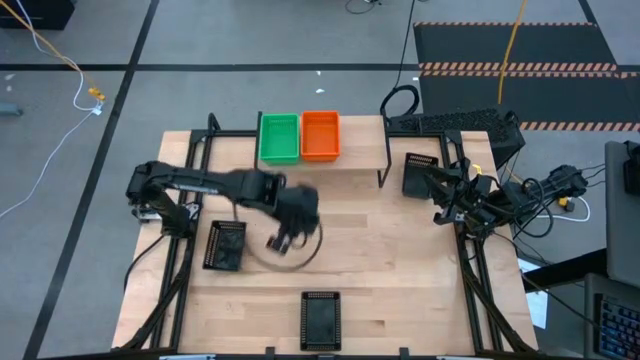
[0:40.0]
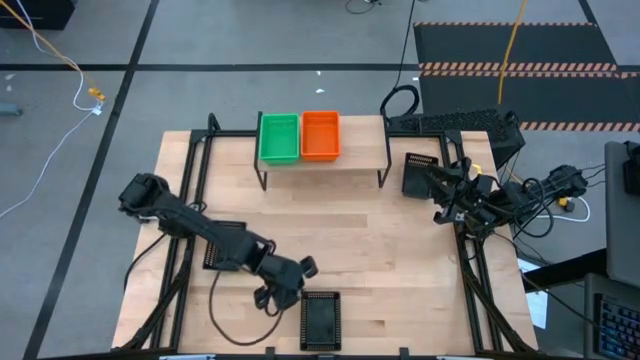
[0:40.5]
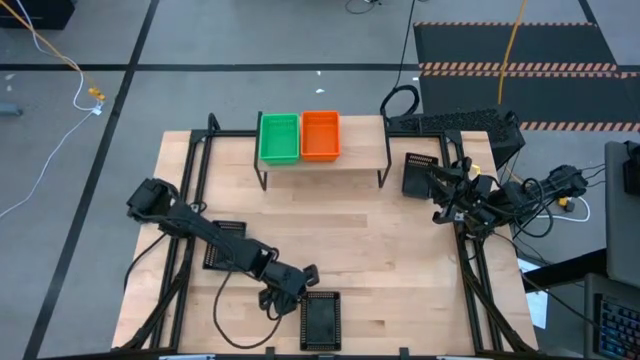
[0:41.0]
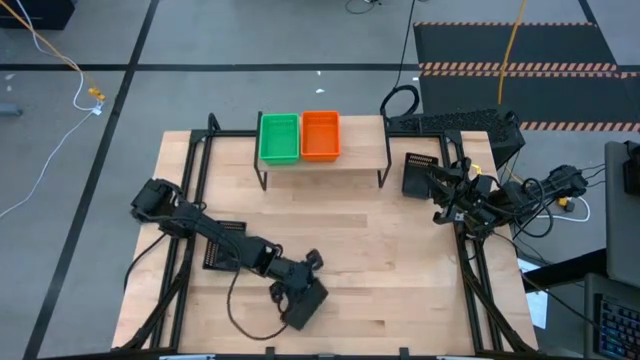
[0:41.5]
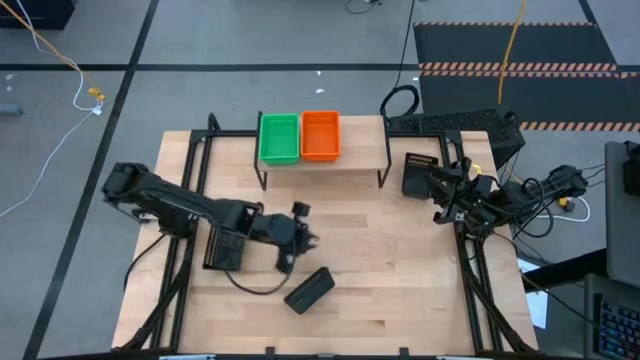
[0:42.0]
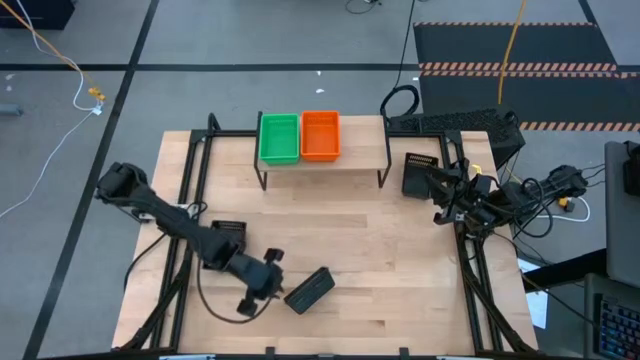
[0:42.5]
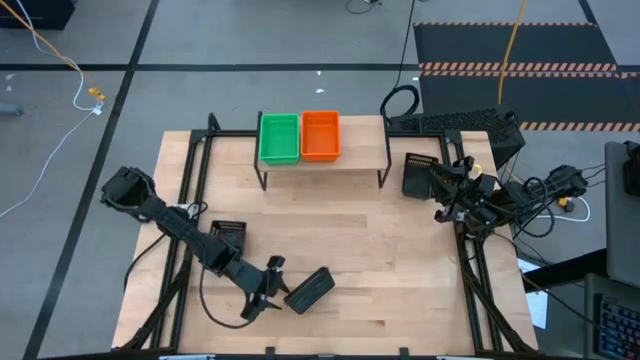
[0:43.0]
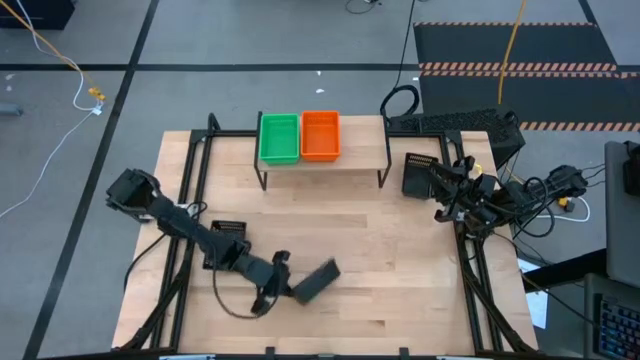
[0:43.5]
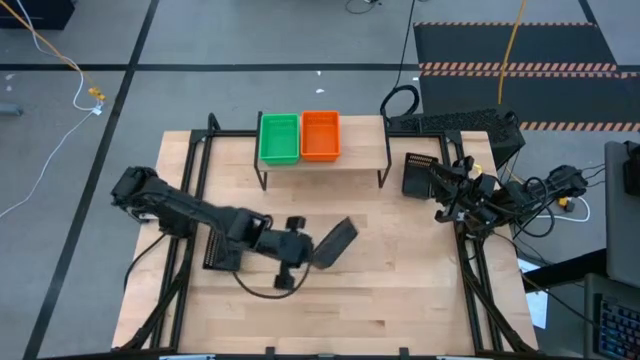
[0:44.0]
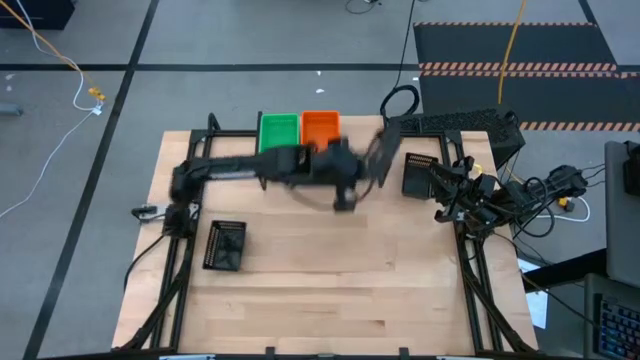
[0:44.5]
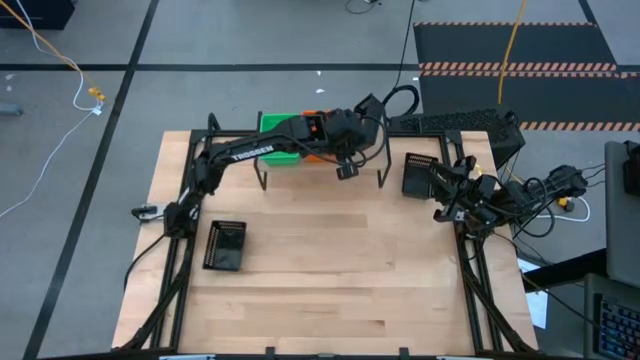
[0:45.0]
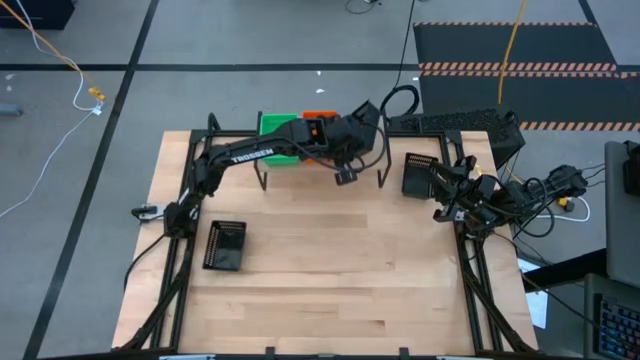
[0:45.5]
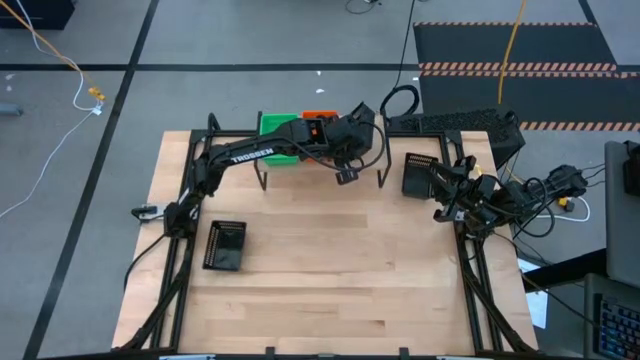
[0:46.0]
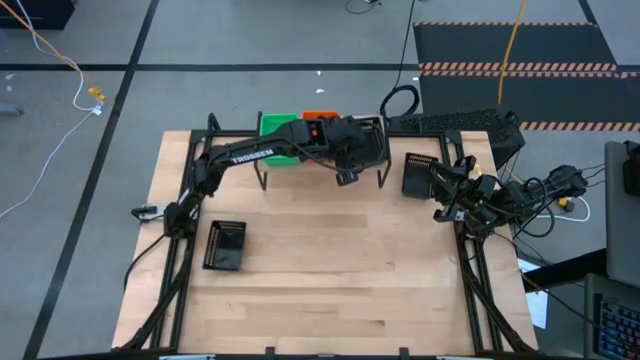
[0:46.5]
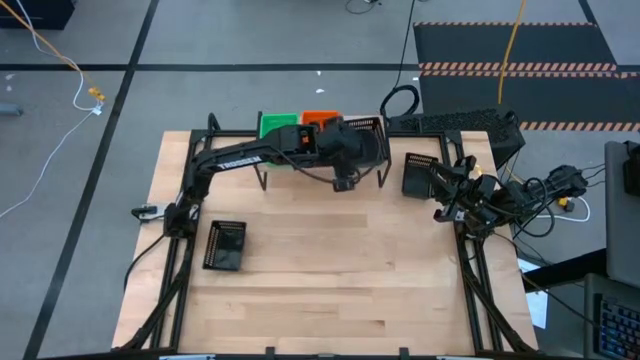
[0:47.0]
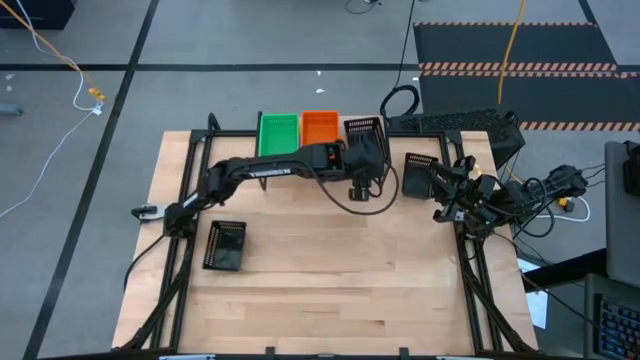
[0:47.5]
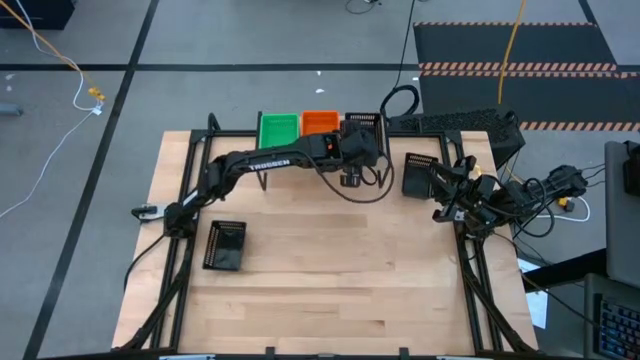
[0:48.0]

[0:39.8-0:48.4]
Task: Stack baskets on shelf by color
Put the bottom black bin on the shelf

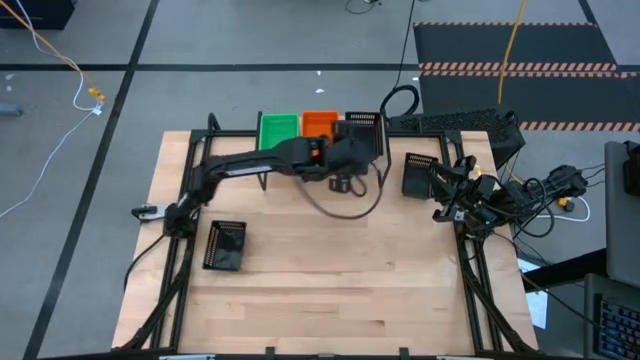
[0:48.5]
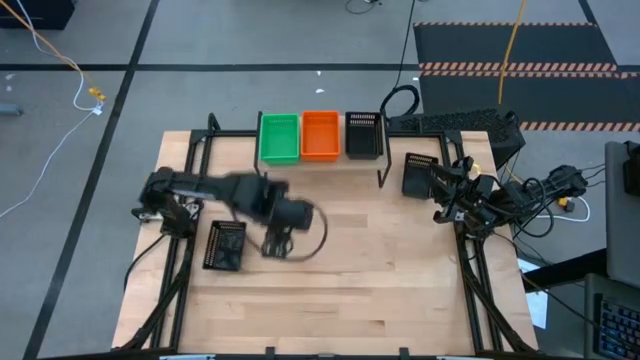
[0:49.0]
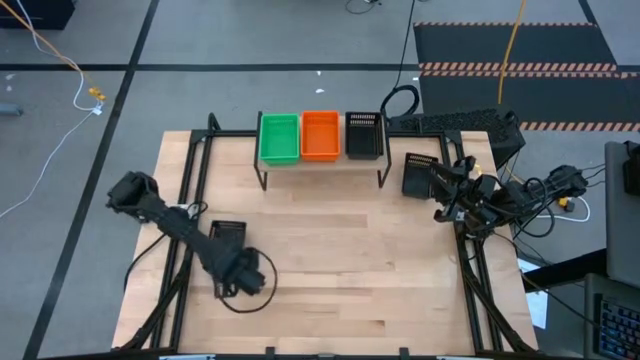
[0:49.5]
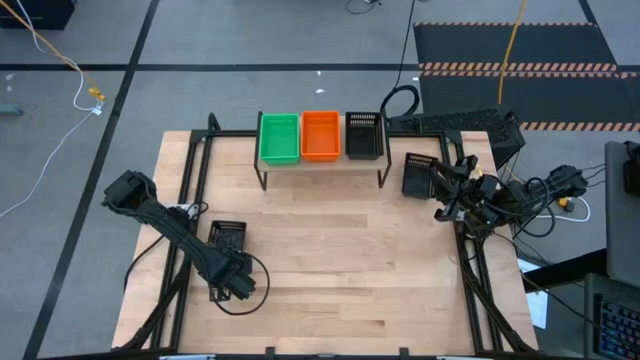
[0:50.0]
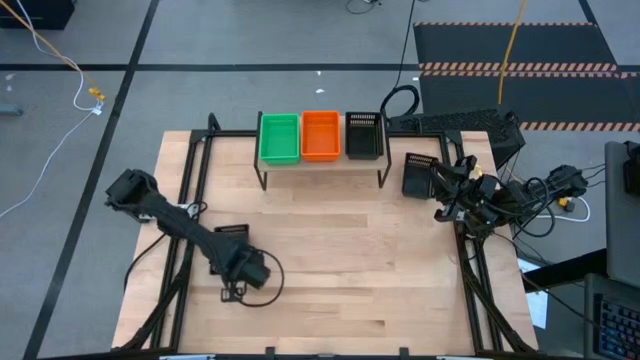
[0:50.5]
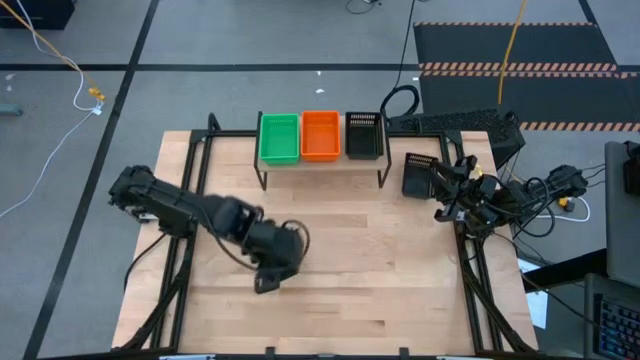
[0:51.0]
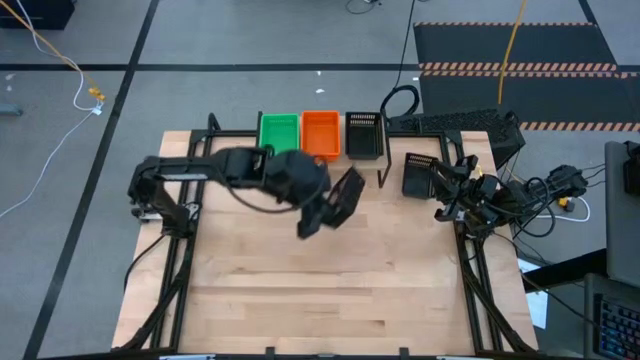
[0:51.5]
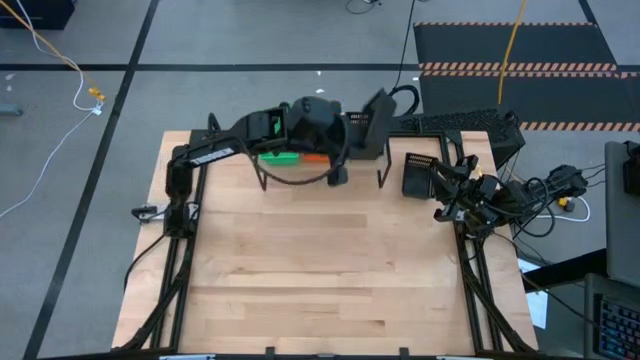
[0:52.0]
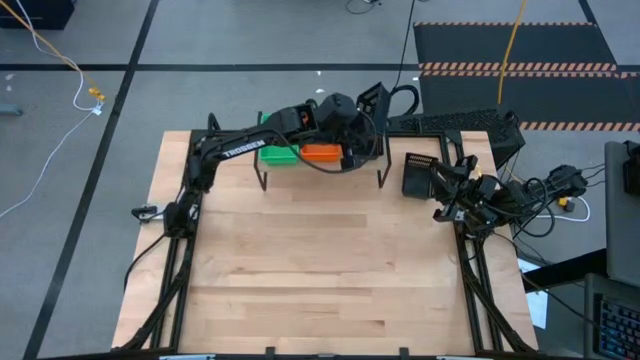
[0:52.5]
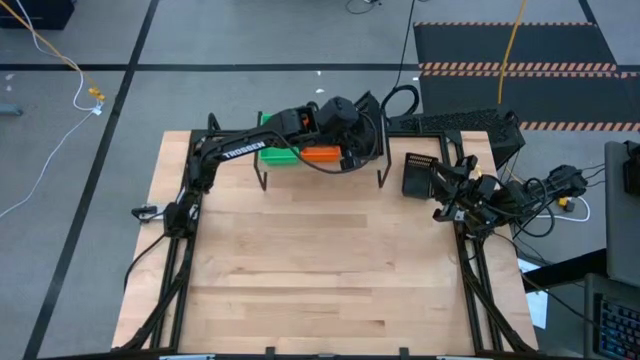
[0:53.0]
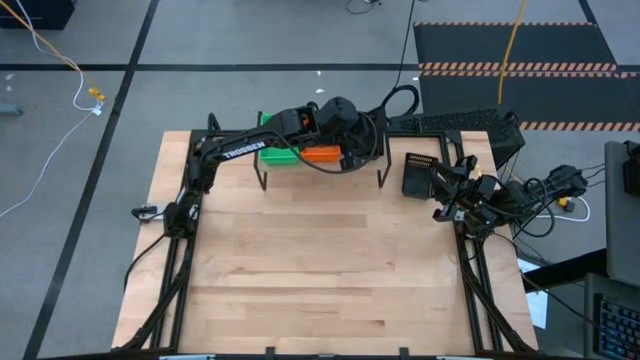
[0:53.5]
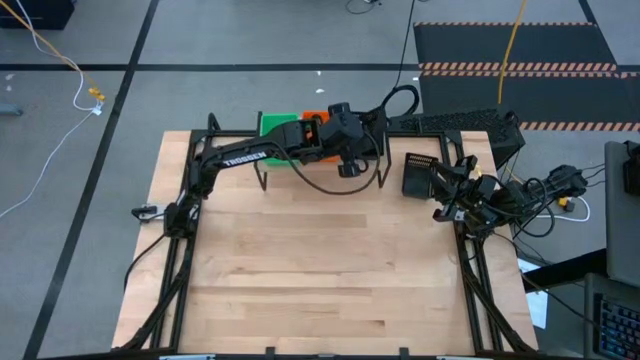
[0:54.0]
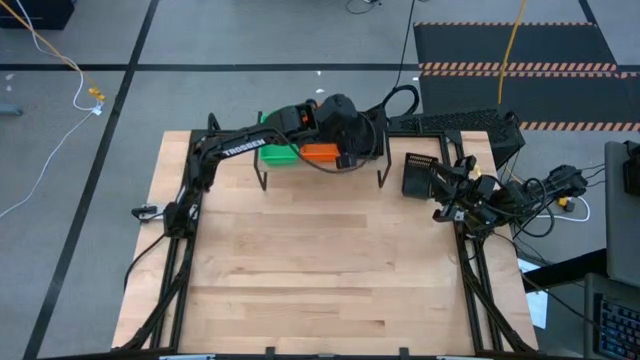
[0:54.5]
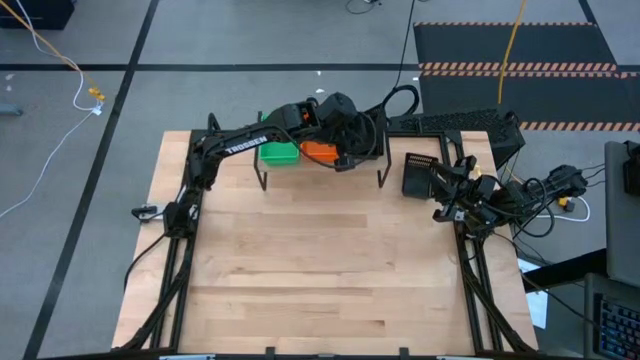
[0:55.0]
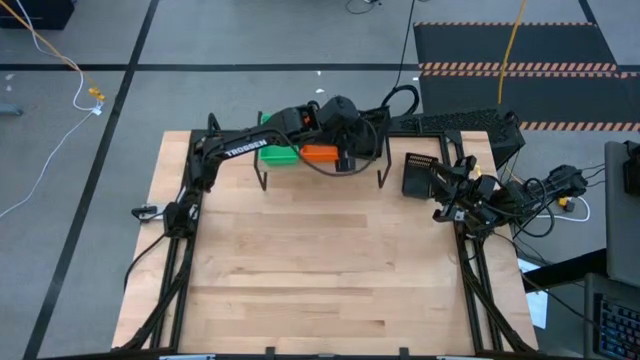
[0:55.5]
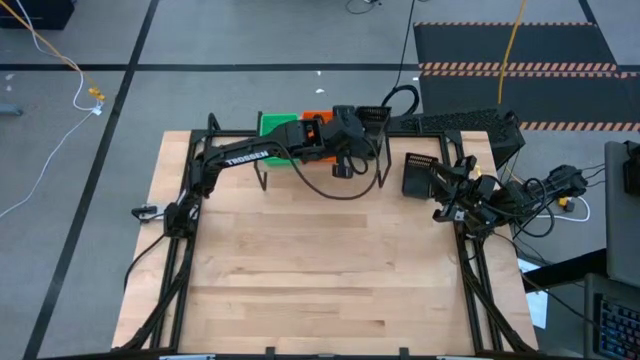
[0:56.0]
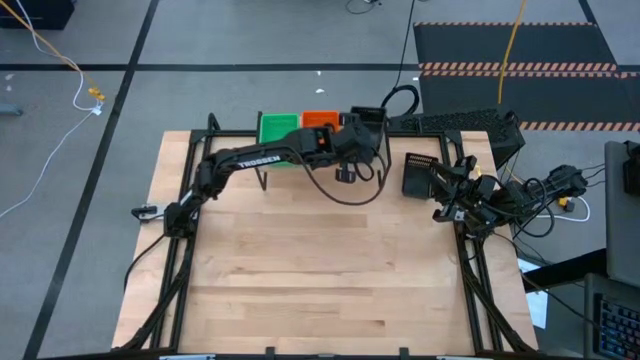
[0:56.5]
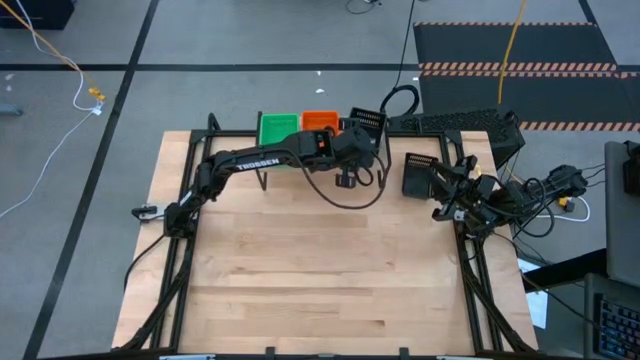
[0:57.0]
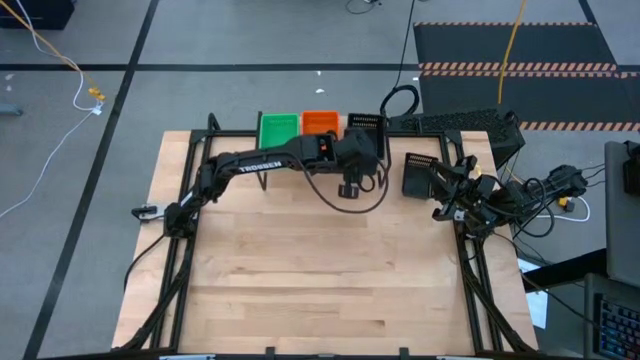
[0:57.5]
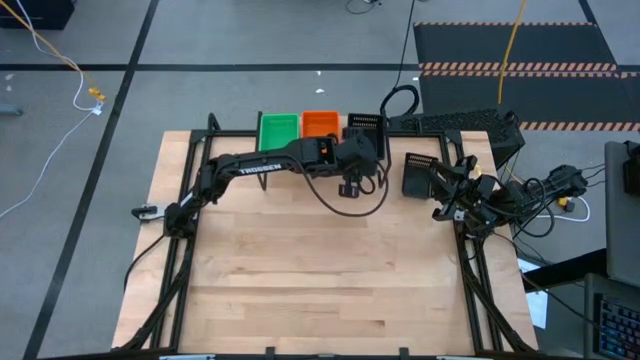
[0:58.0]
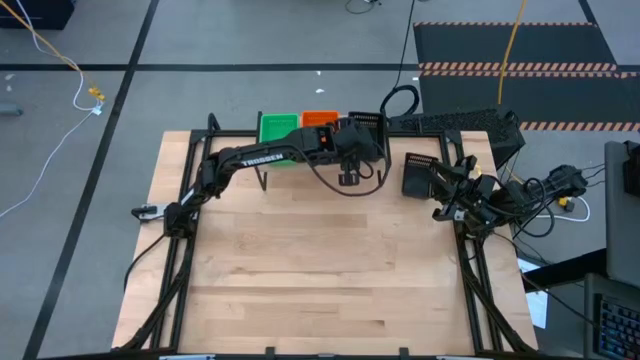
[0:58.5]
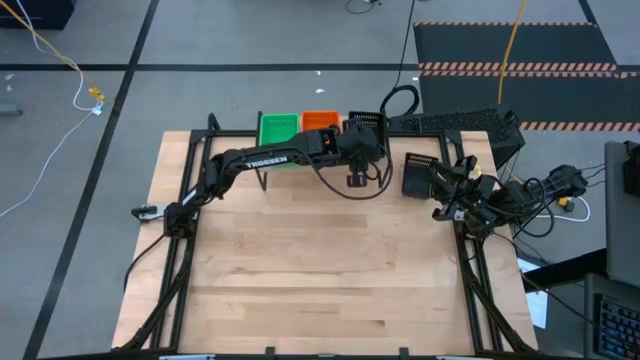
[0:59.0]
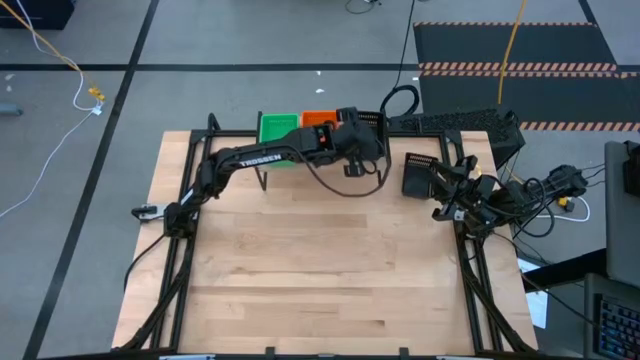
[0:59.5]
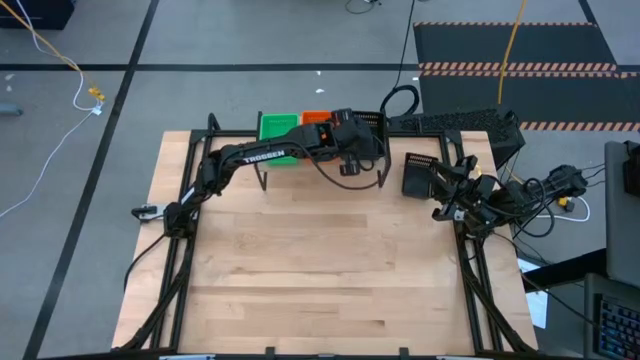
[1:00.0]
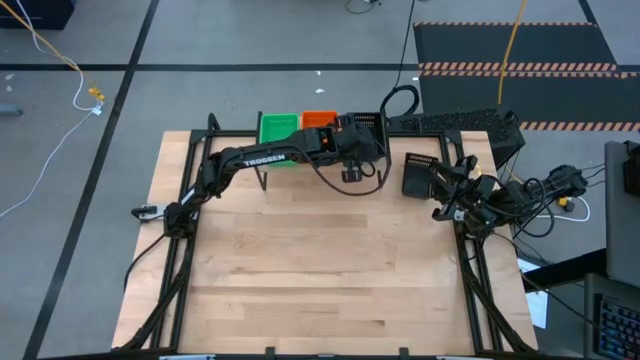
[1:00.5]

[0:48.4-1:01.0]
Stack the left black bin on top of the black bin on the shelf
